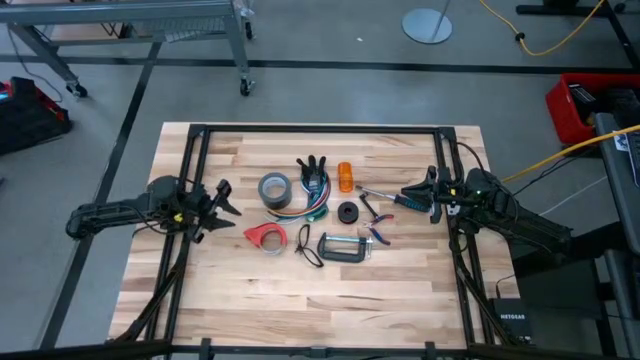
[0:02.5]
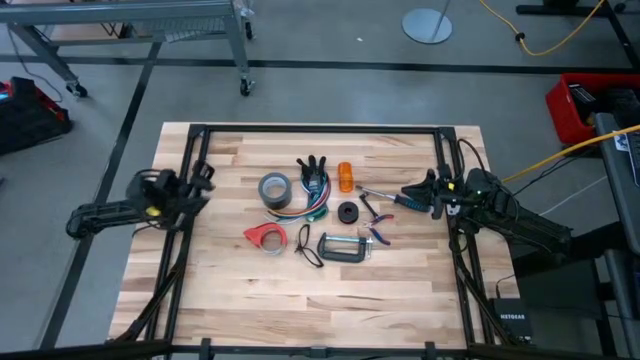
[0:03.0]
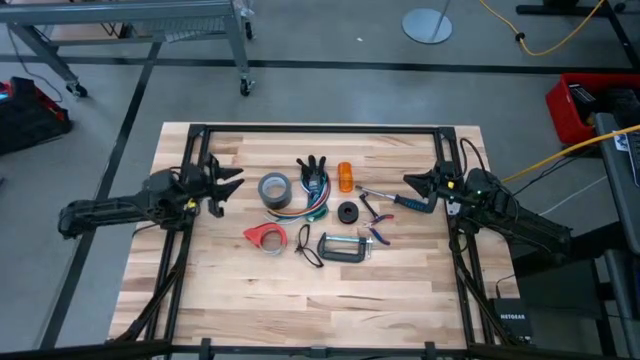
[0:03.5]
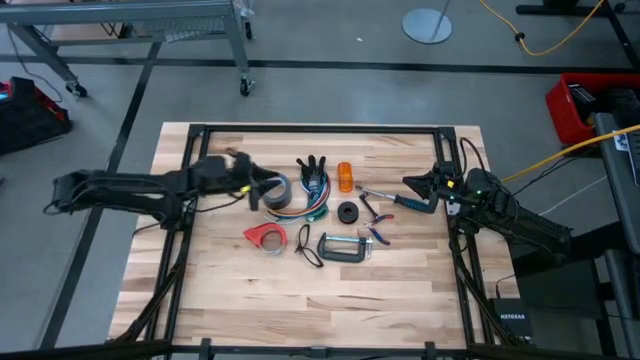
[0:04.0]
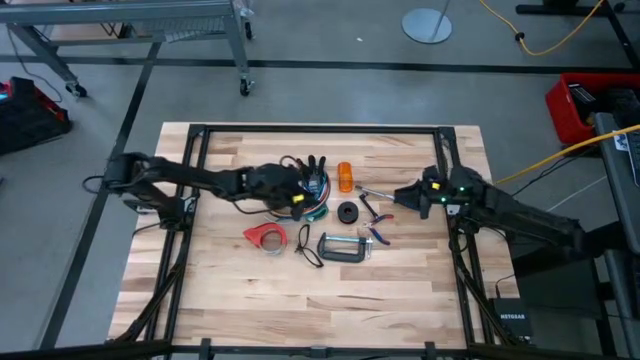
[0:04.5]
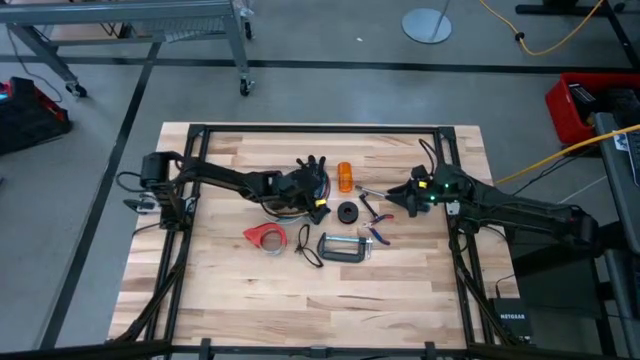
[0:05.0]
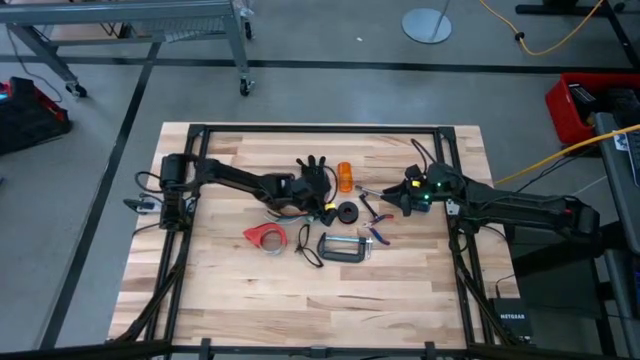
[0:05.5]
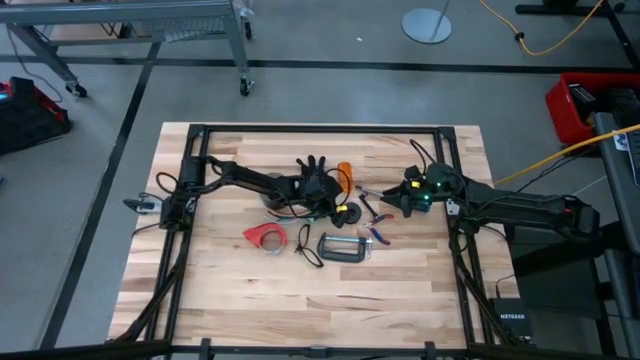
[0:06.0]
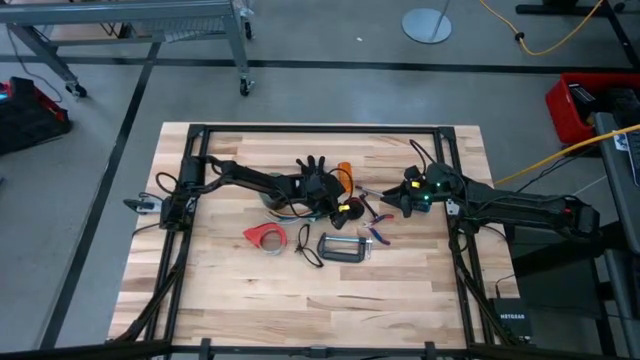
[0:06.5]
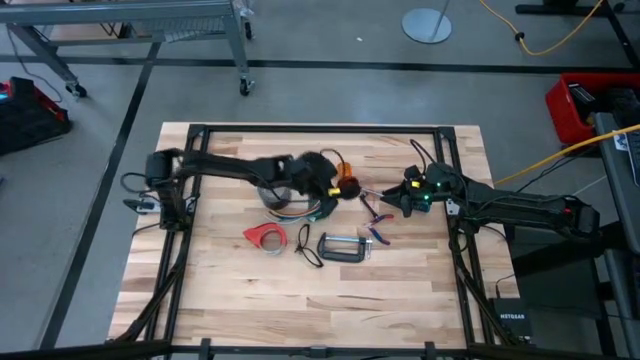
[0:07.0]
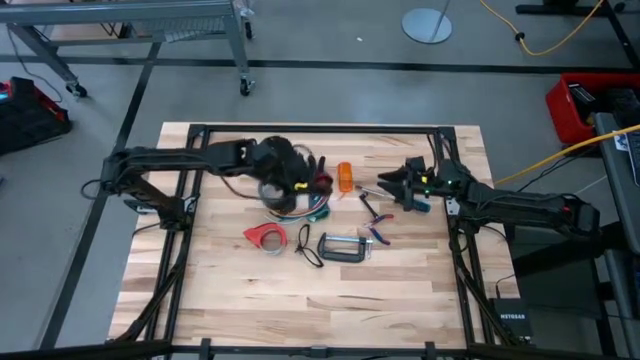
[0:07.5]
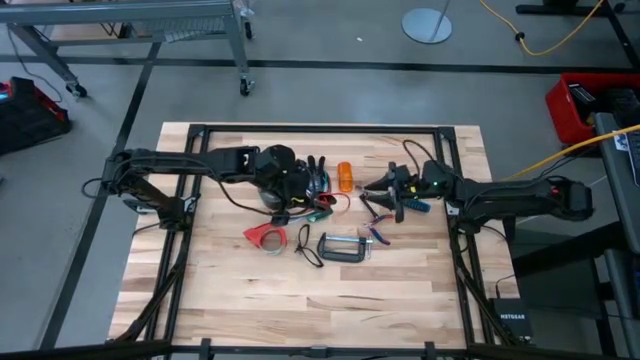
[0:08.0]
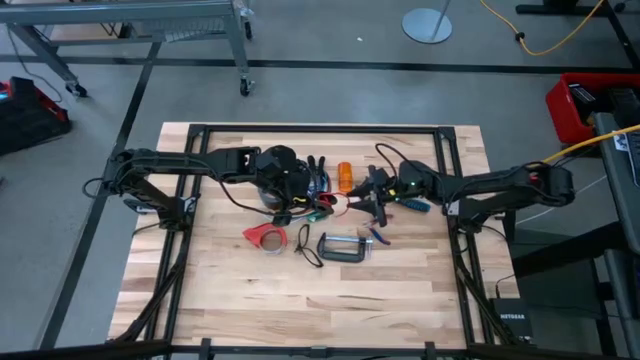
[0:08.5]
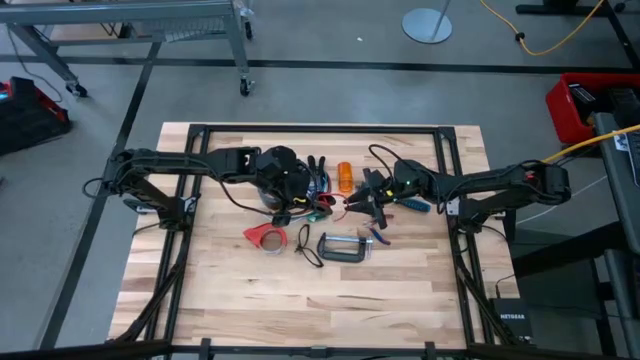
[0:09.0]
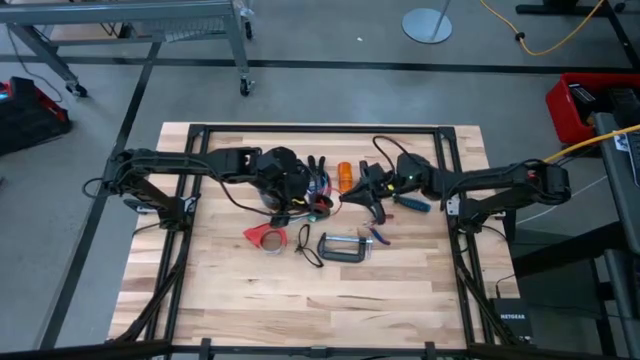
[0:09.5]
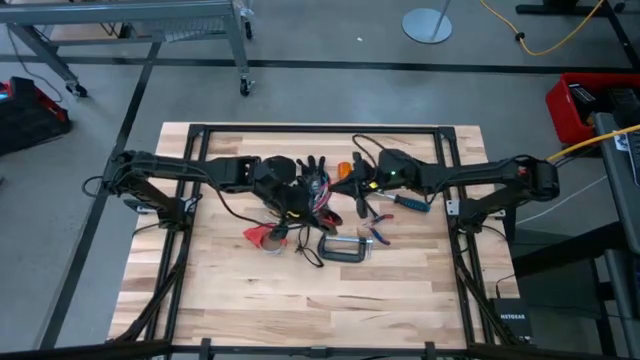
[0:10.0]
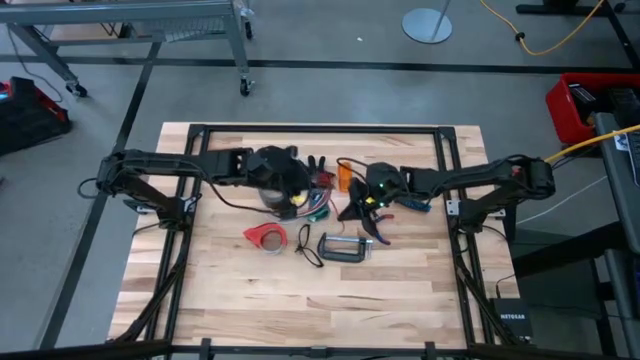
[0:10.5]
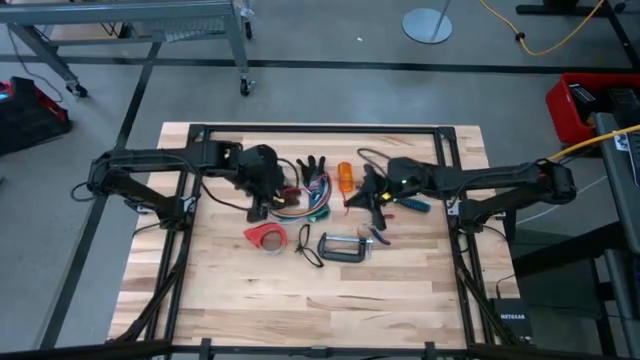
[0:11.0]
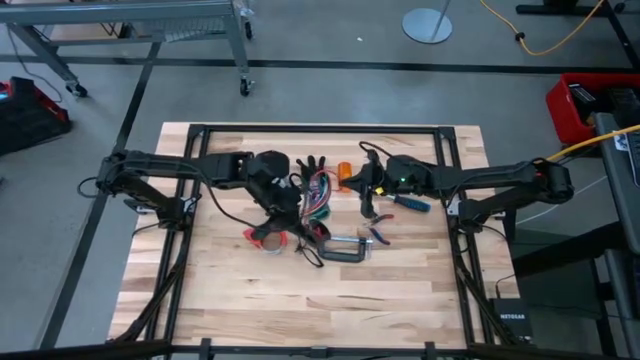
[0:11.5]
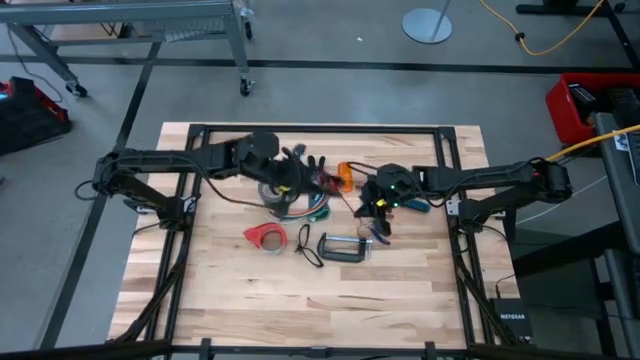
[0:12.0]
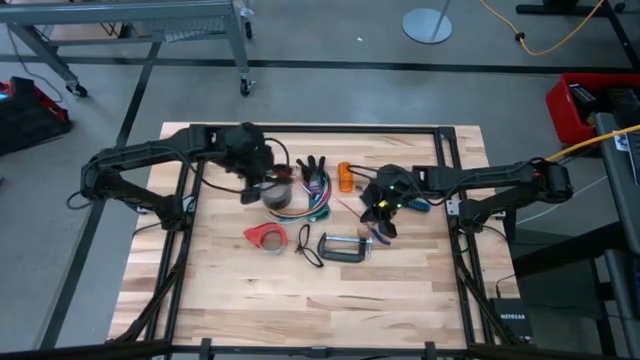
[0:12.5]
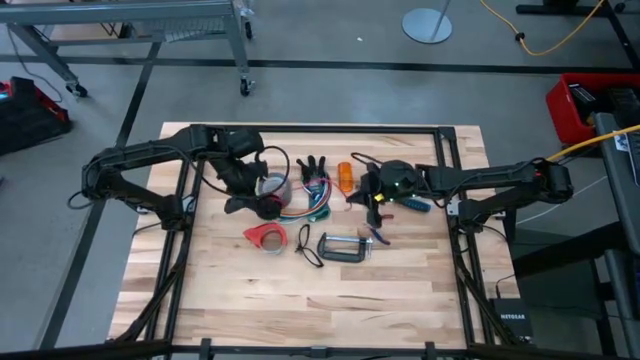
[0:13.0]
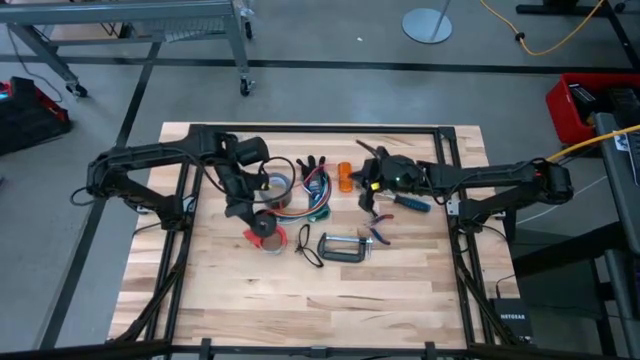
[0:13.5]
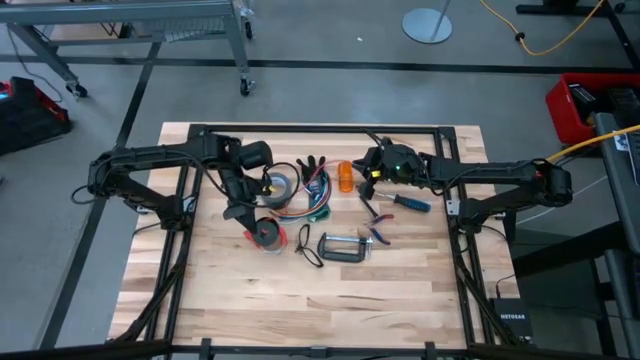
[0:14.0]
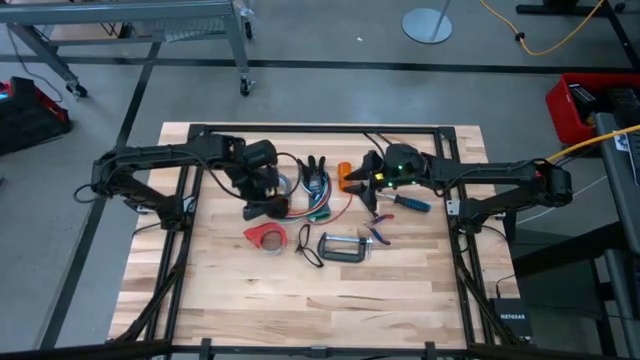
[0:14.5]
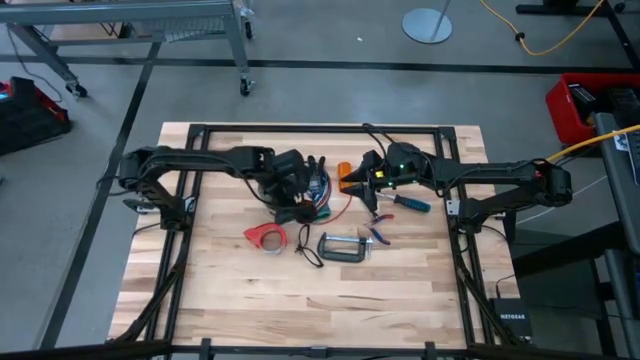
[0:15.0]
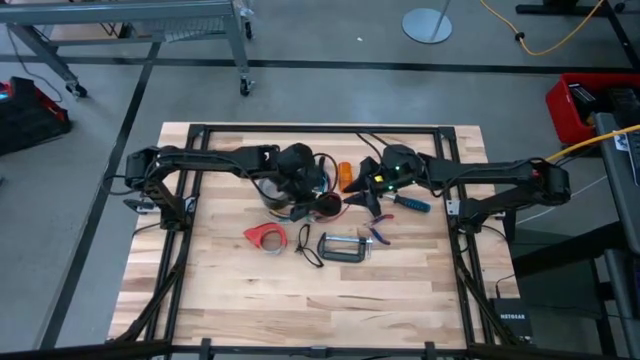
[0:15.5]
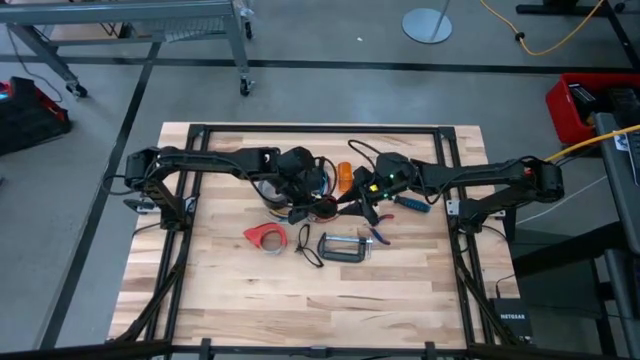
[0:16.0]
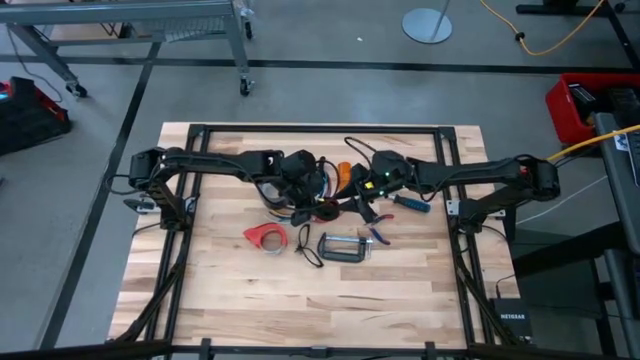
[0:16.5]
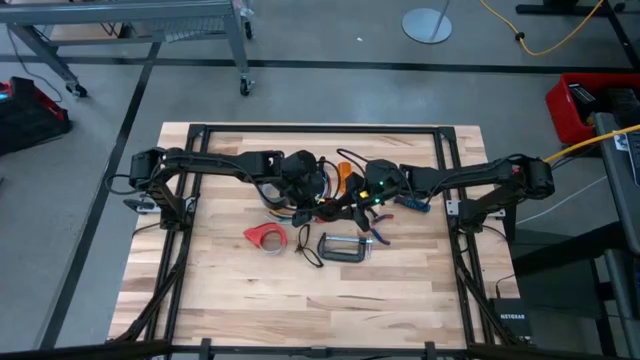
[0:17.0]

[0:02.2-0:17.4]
Task: Coil cords
Uncoil the wire from the spool

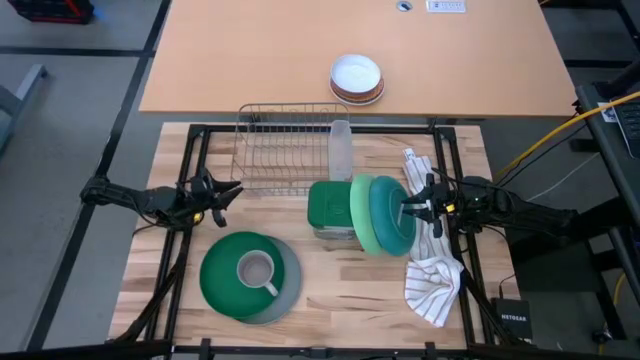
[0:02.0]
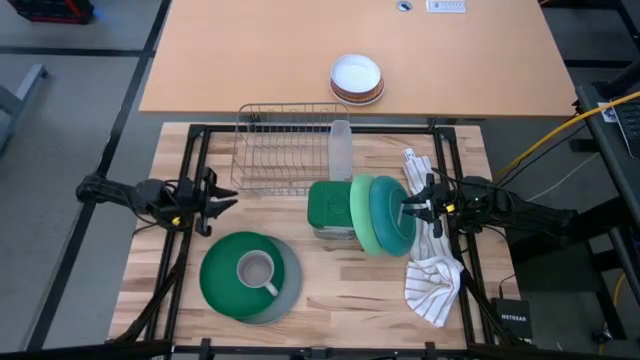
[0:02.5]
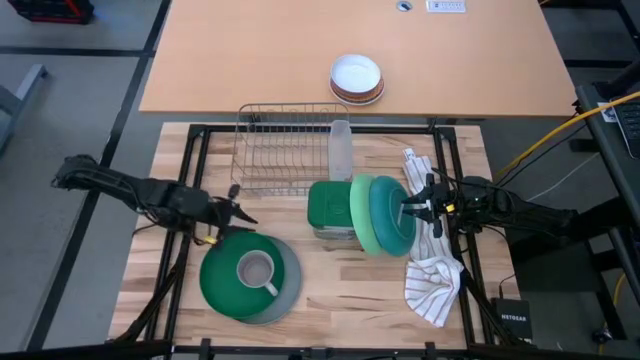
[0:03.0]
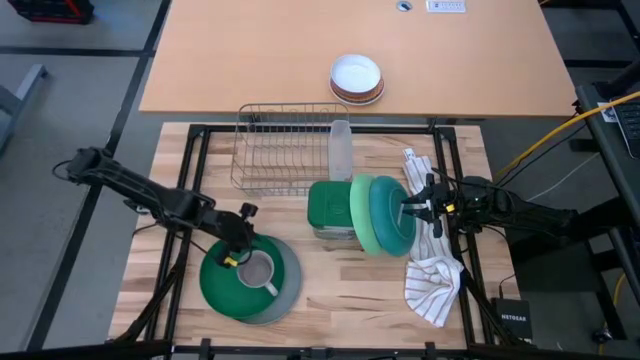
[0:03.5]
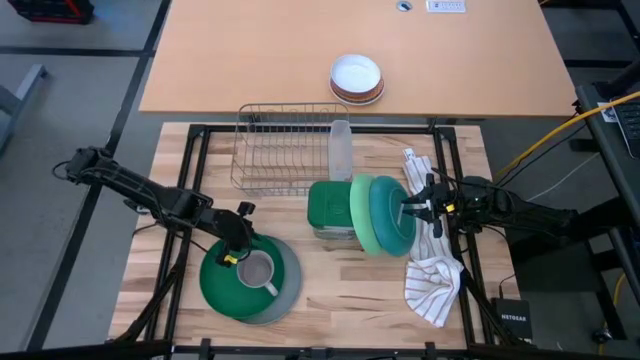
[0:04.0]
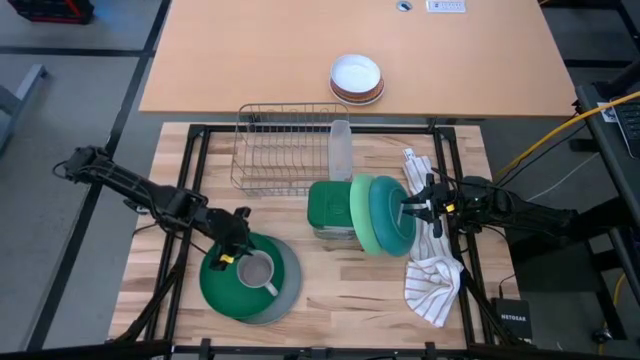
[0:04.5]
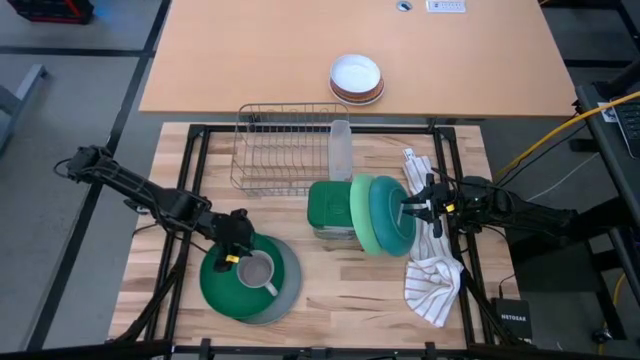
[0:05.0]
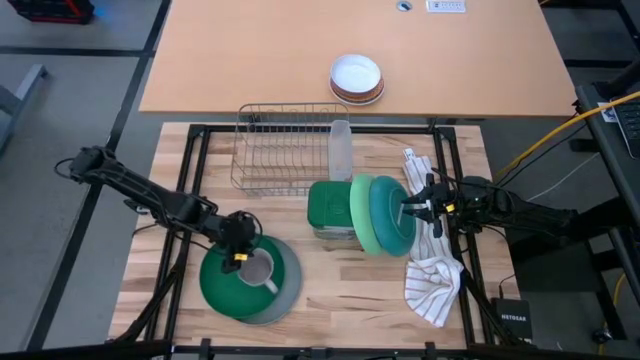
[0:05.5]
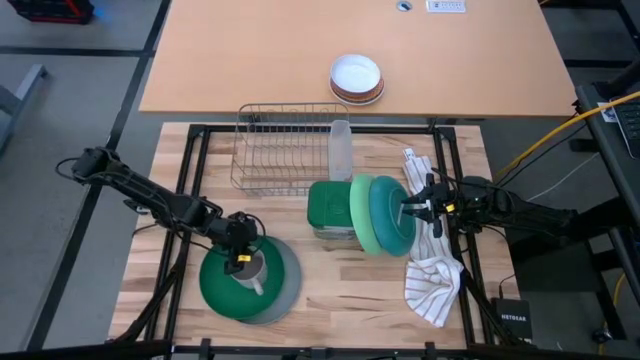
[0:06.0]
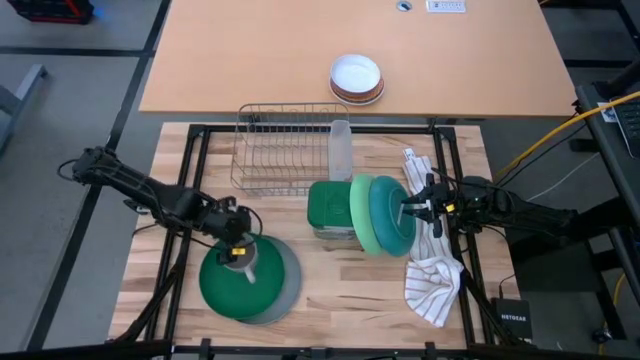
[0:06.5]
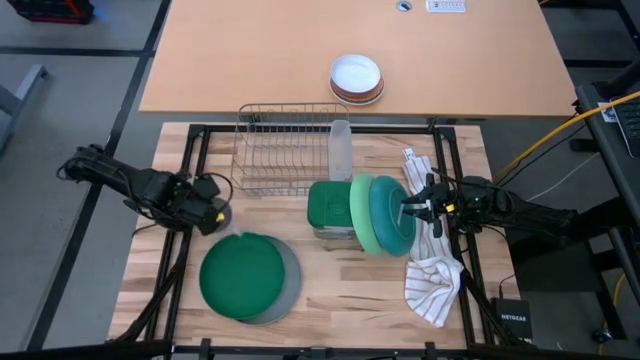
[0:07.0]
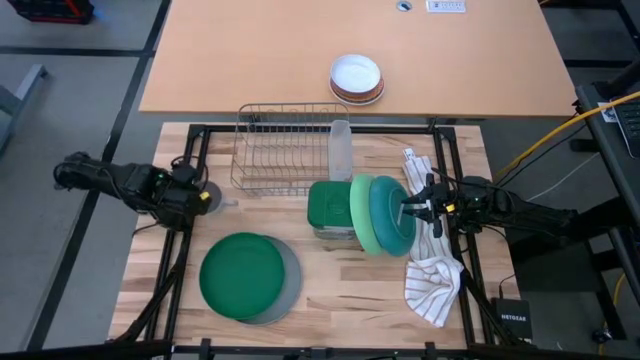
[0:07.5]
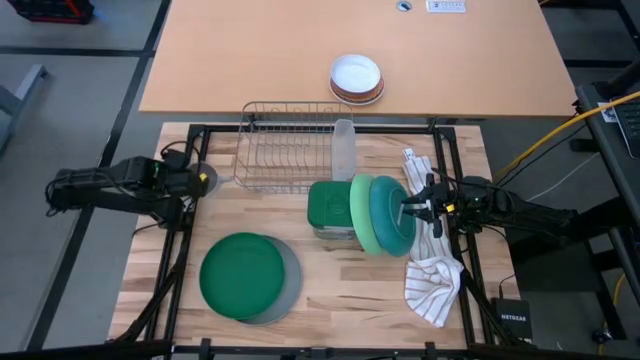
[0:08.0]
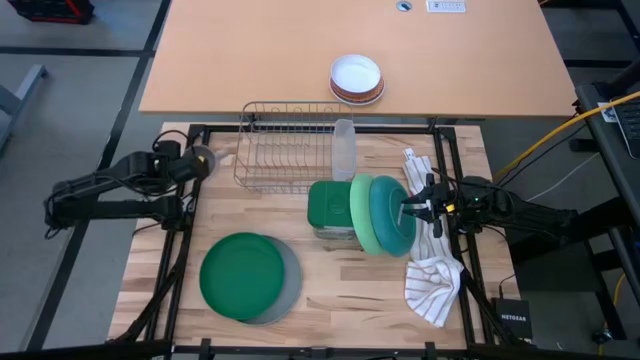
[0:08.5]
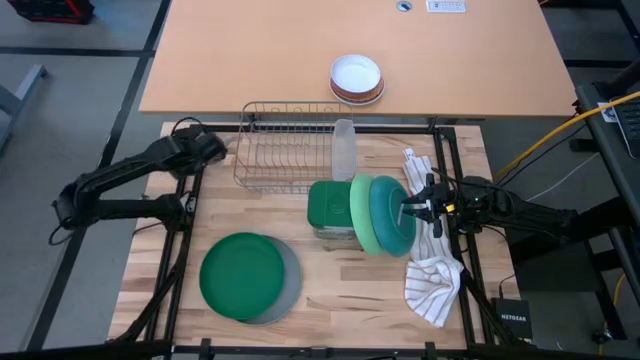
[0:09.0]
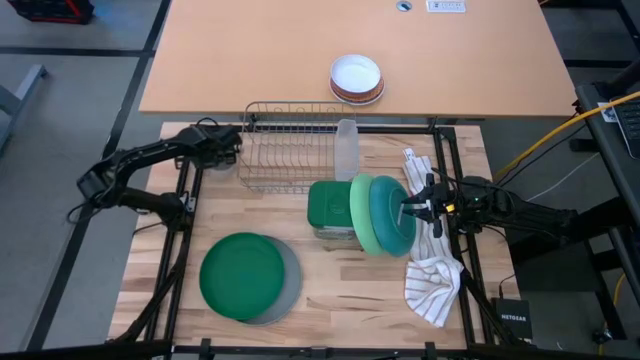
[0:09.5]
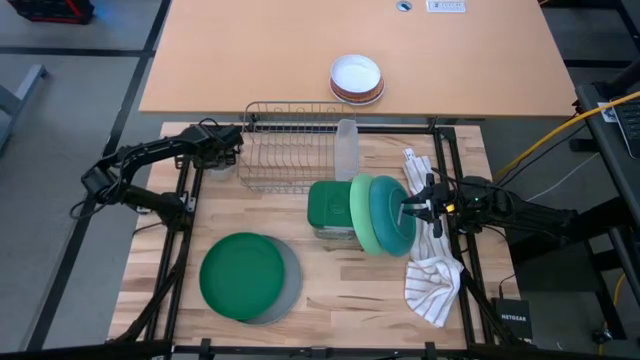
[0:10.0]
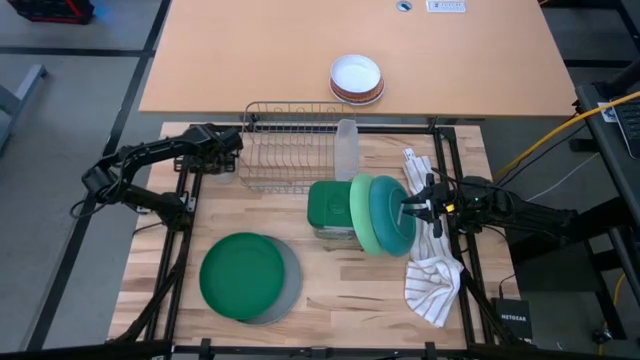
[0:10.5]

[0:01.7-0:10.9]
Task: Sort dishes
Move the white mug to the top left of the table
